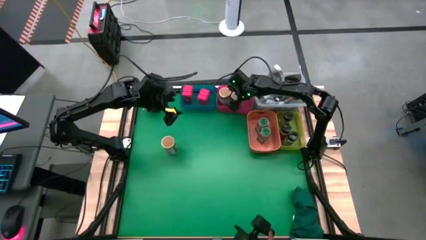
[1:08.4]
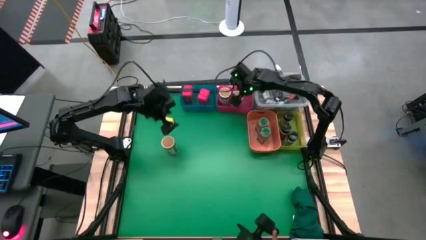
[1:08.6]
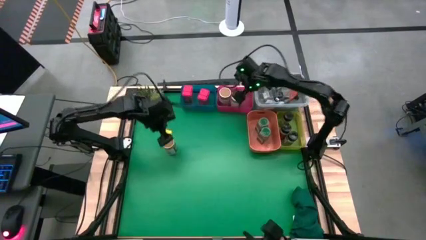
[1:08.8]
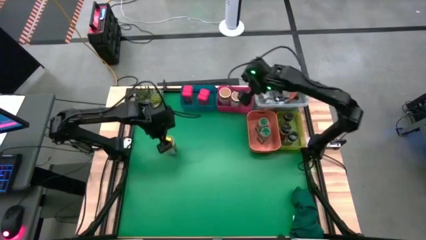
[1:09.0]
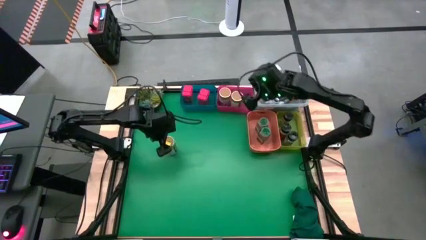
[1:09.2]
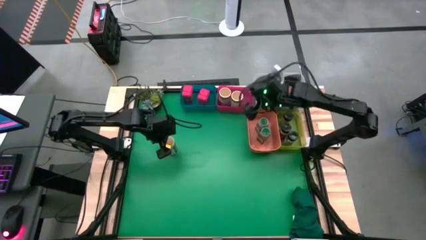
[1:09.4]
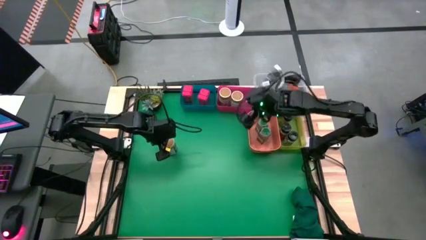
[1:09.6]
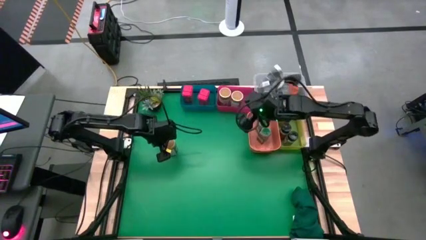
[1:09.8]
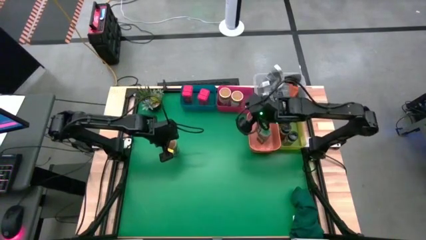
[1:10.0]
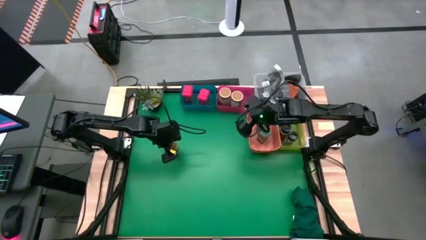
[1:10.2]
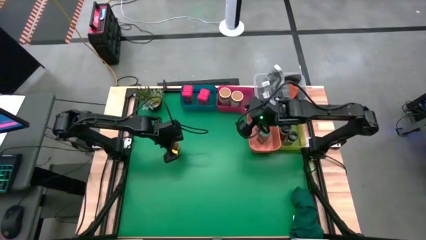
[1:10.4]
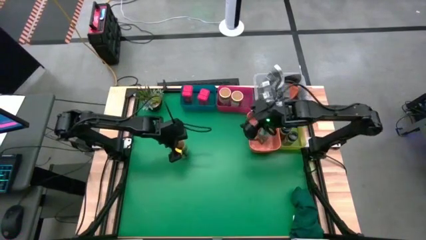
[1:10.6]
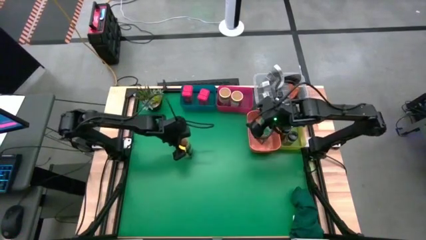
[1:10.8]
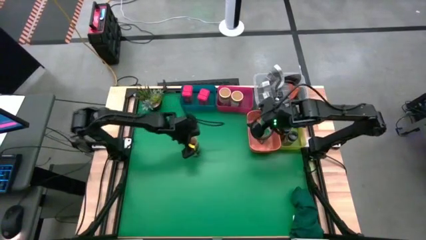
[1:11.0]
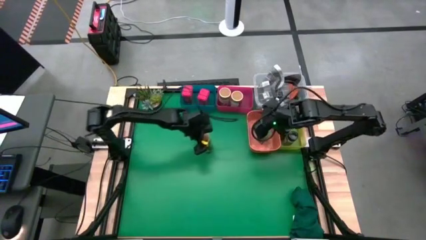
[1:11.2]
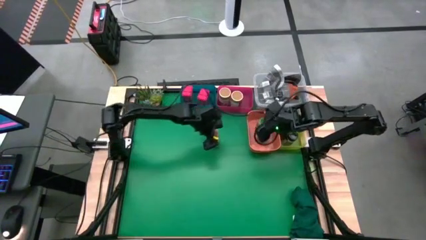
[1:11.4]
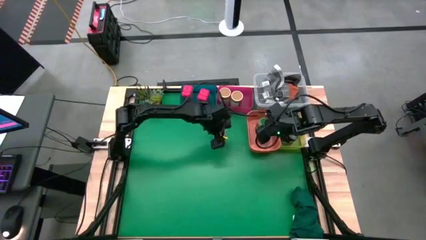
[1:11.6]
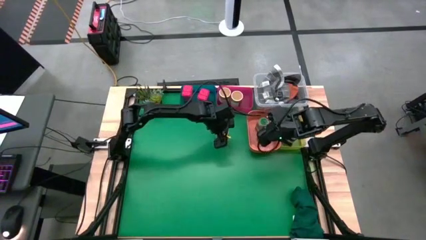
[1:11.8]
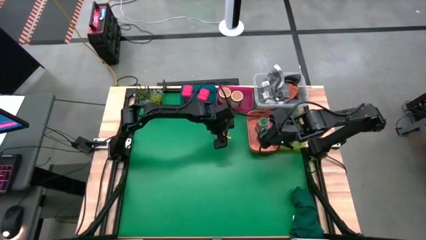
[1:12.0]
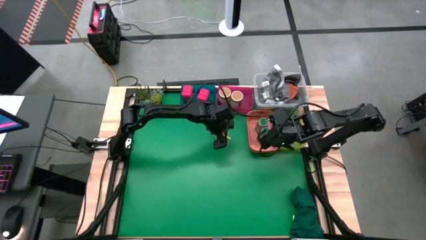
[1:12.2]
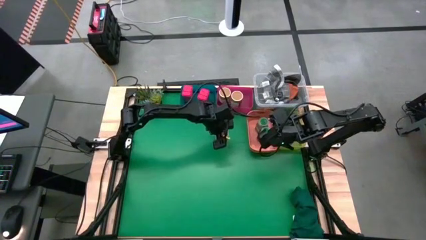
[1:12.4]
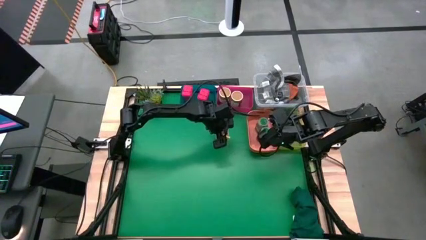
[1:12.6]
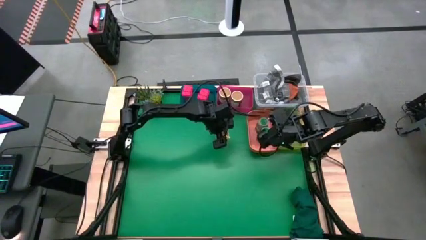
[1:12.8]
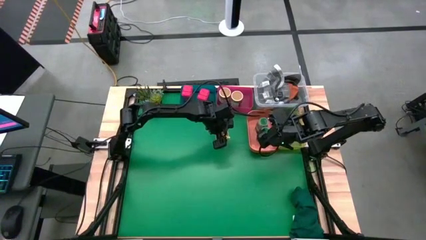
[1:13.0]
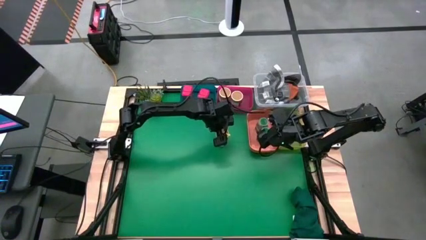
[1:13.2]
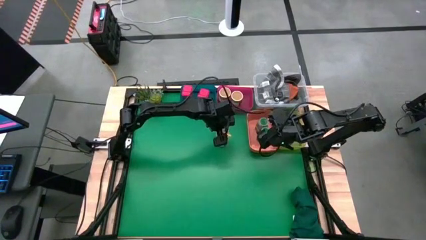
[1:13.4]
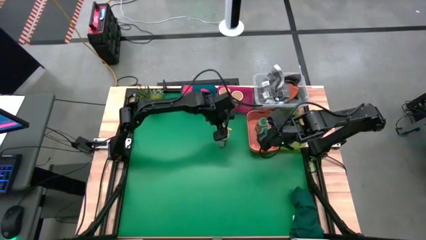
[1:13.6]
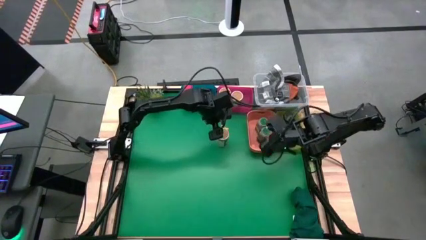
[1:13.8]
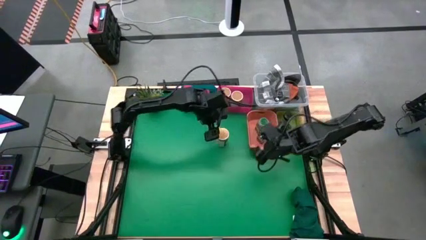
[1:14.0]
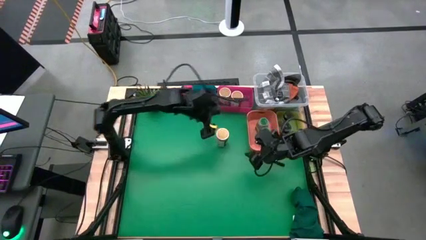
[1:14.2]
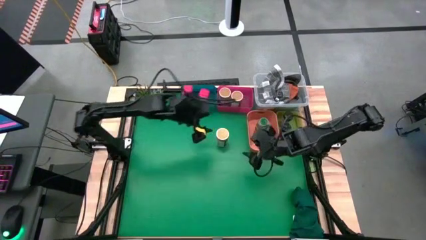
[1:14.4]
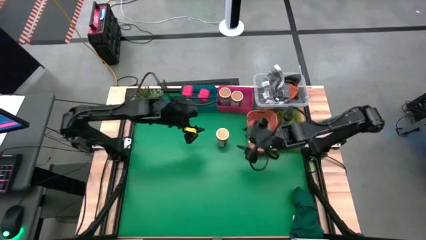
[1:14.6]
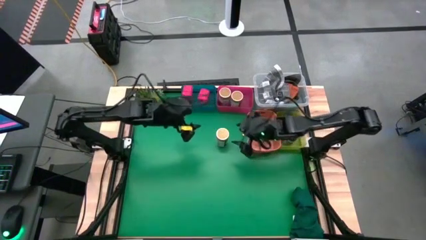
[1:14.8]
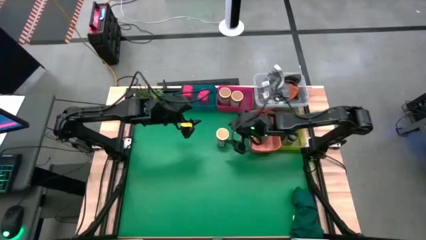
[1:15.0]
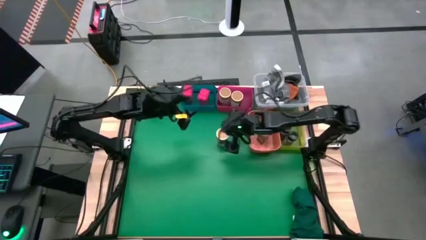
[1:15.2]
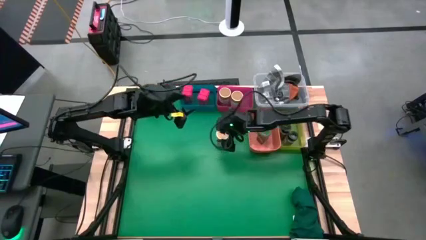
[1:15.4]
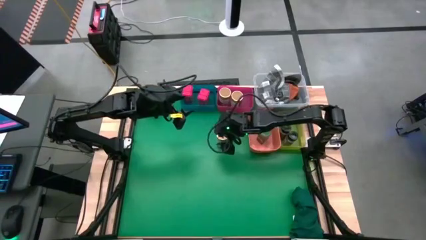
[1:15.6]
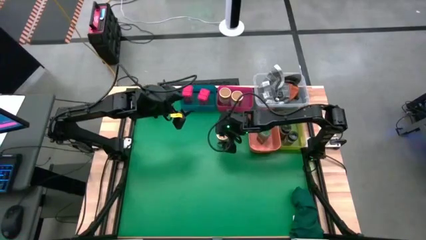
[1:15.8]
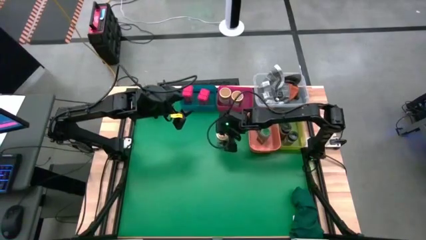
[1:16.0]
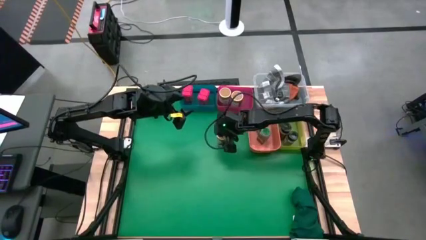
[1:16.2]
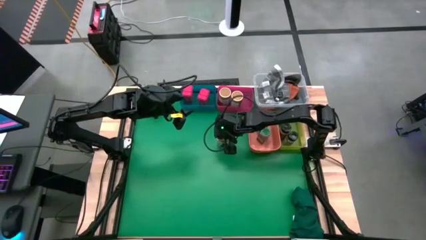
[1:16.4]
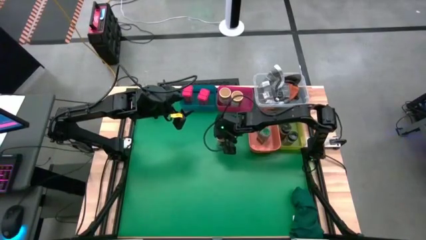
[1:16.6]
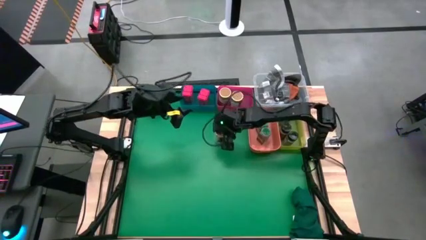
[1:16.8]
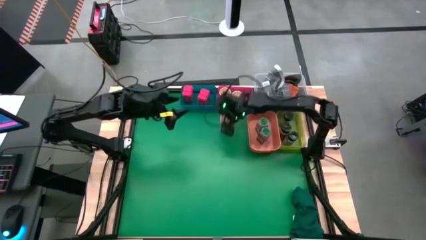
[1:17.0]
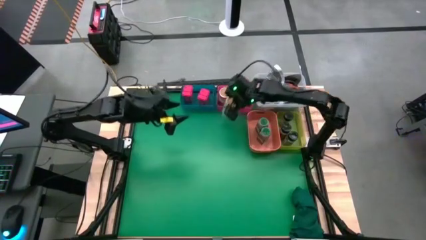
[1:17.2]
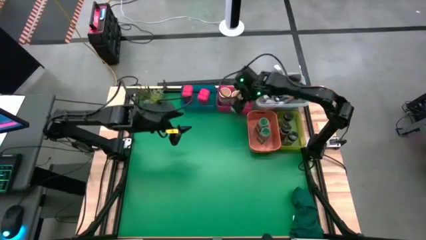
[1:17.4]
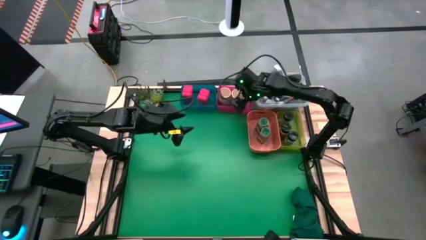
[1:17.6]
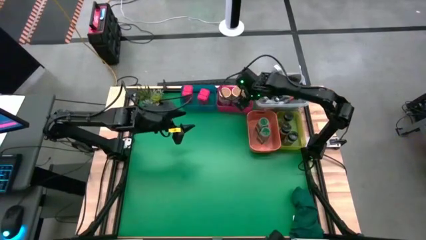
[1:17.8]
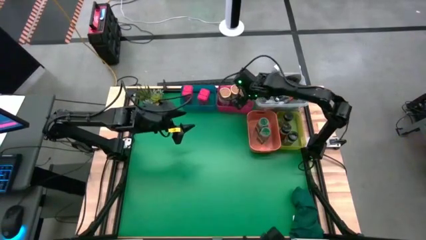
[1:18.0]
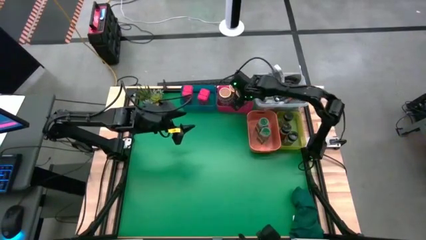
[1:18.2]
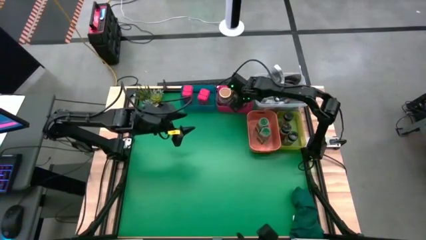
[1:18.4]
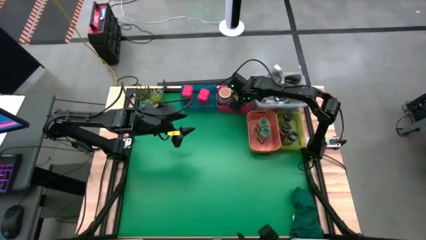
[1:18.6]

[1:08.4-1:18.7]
Task: Sort spices by type
Put the brown seasoning bottle into the red bin

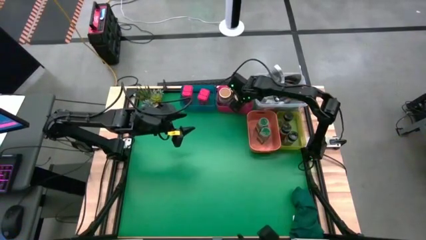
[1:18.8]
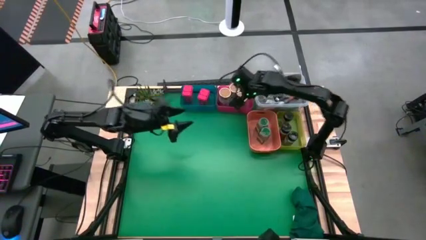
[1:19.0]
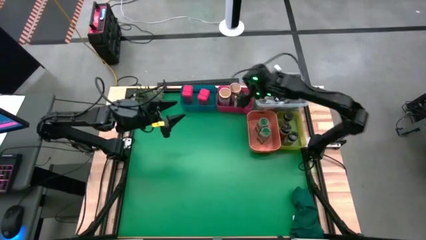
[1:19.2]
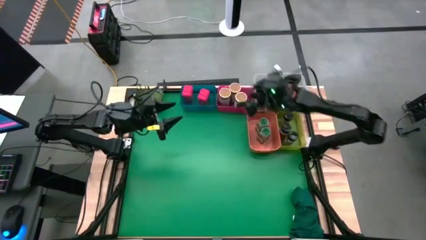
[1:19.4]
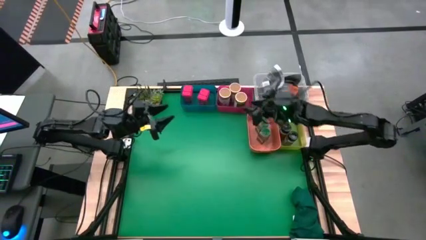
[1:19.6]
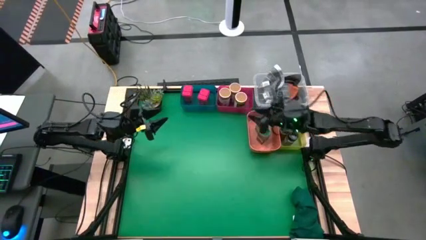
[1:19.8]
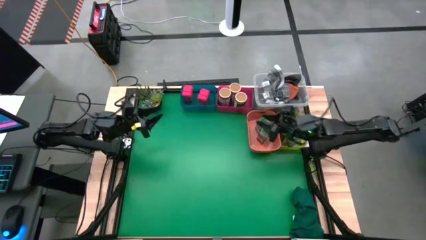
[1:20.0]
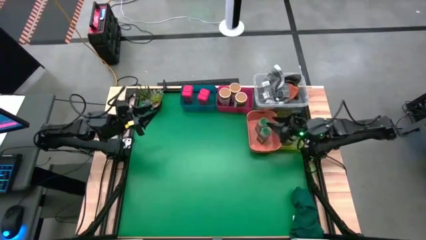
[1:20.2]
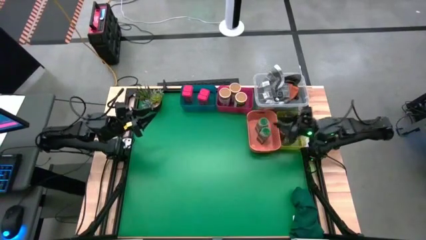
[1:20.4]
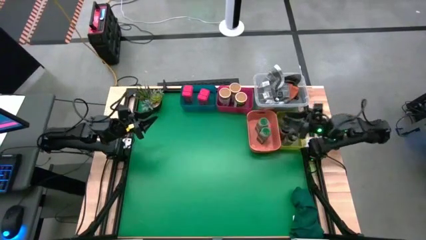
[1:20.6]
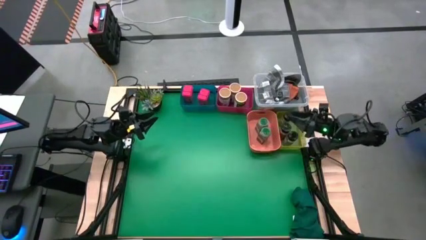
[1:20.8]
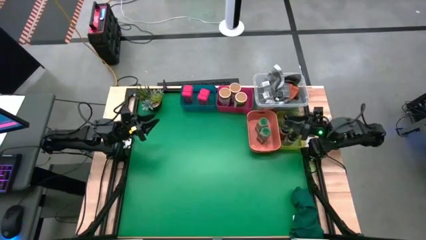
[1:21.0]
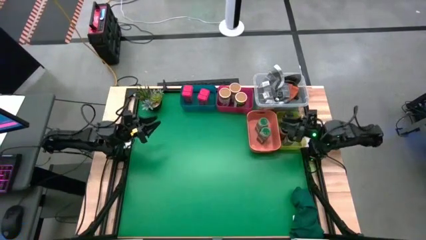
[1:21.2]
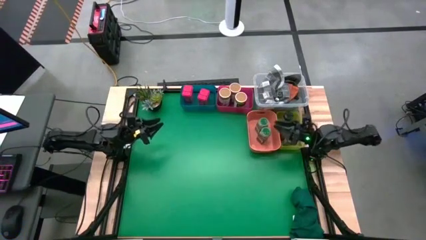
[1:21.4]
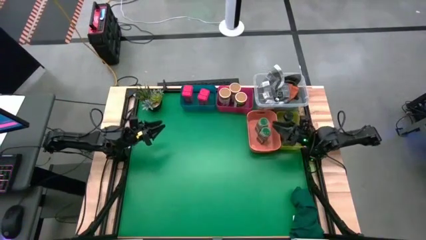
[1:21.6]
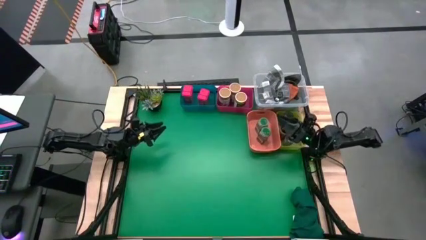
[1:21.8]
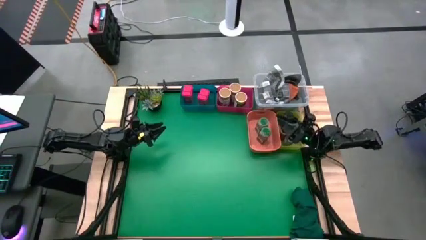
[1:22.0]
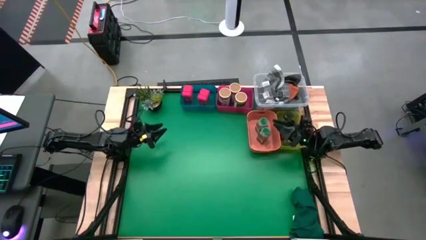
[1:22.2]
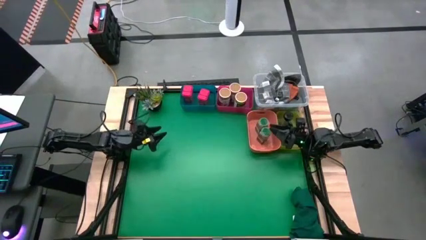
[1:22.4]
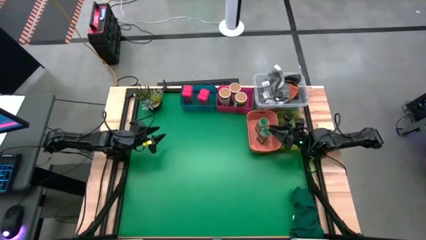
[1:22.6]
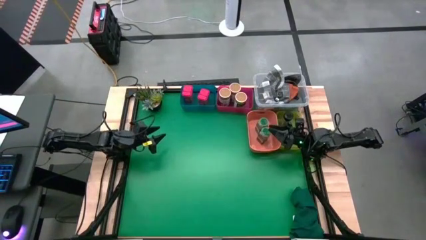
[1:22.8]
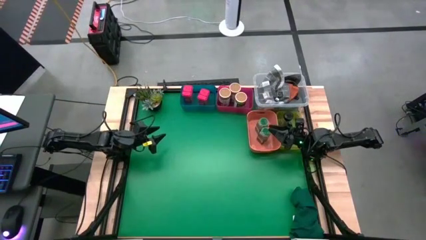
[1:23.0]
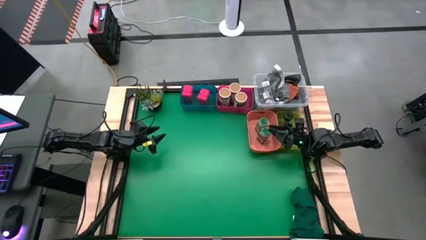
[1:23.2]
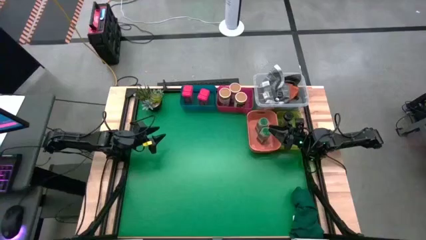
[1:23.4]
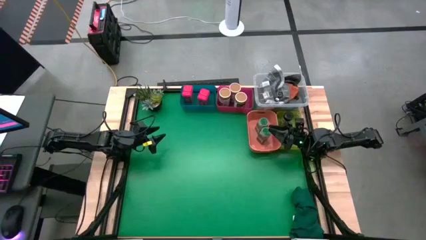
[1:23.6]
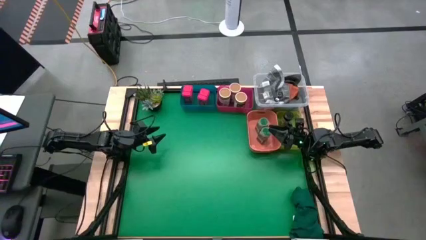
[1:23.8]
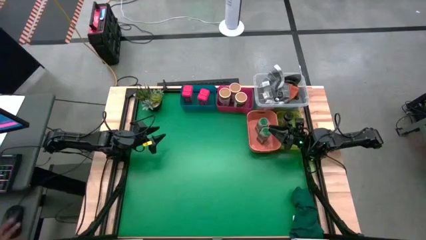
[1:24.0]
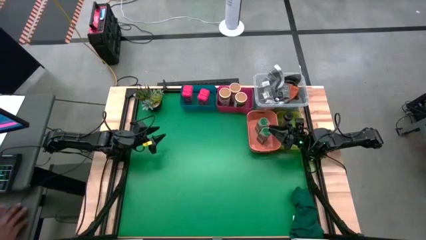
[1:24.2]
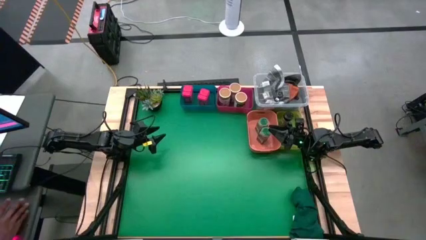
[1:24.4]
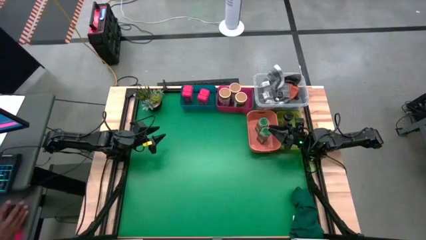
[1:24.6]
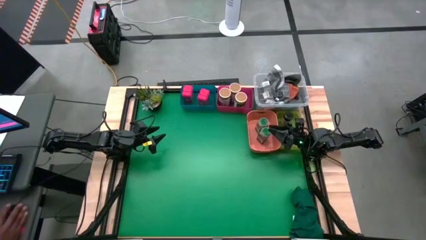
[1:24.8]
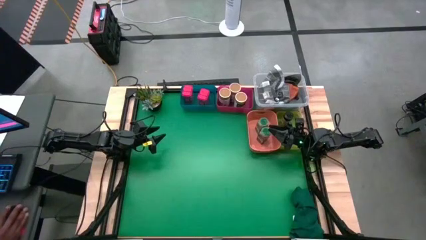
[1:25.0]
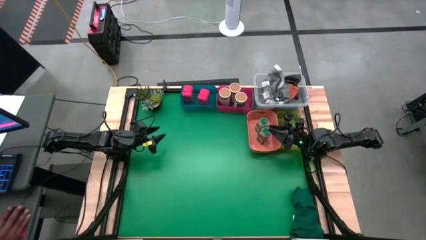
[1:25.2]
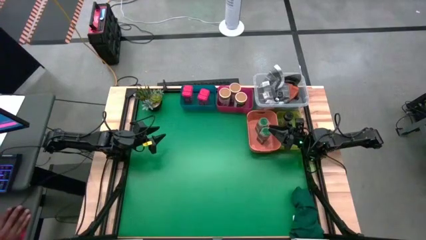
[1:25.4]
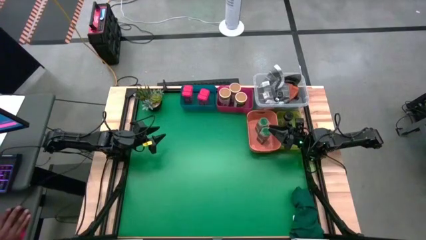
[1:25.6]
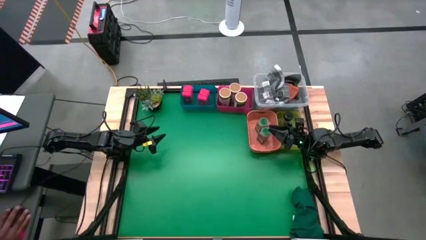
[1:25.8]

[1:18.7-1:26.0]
Return to Home Position
